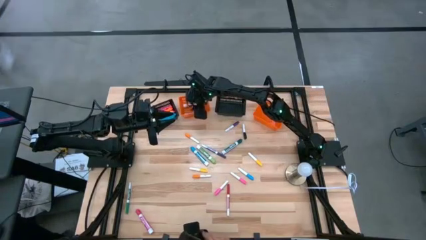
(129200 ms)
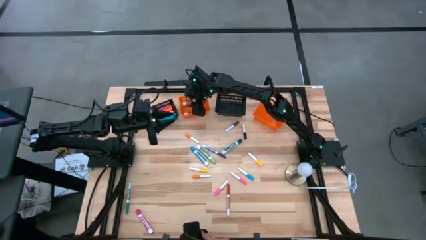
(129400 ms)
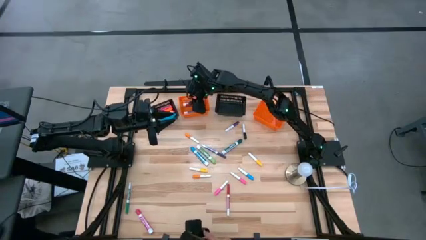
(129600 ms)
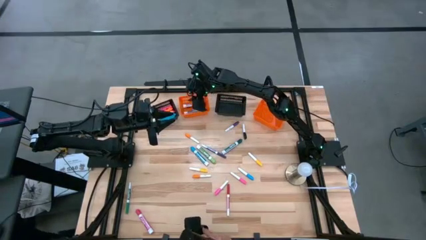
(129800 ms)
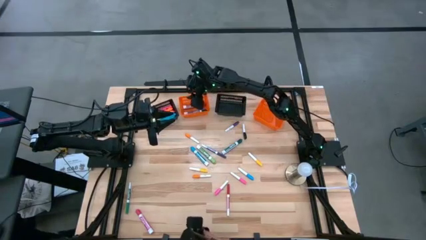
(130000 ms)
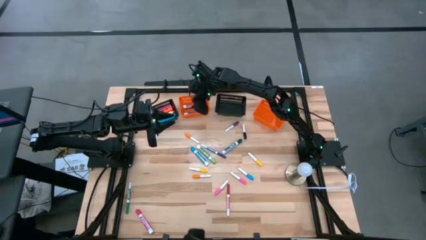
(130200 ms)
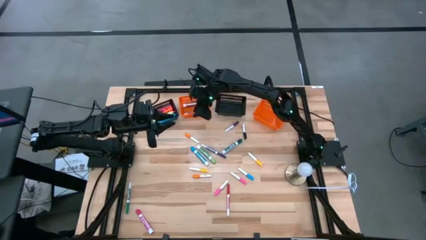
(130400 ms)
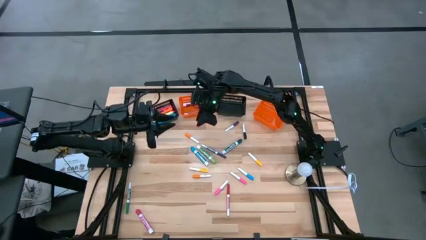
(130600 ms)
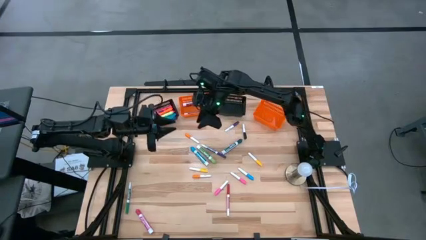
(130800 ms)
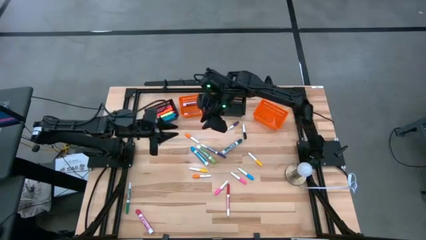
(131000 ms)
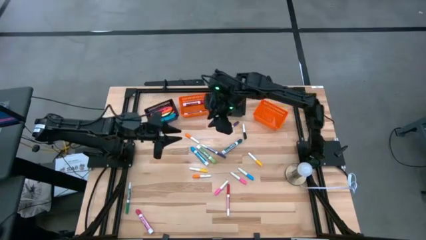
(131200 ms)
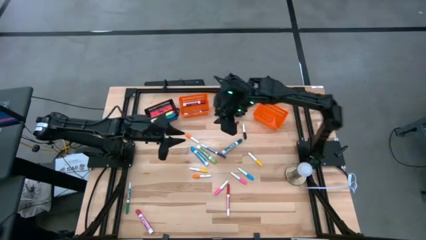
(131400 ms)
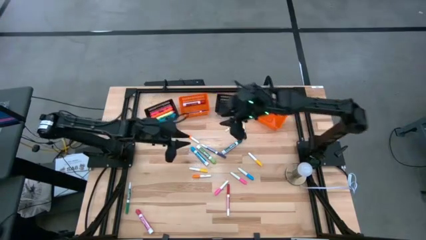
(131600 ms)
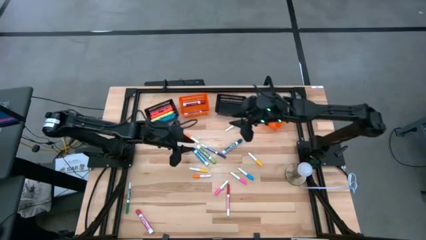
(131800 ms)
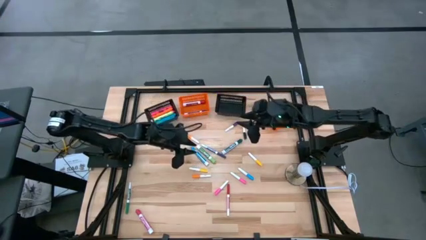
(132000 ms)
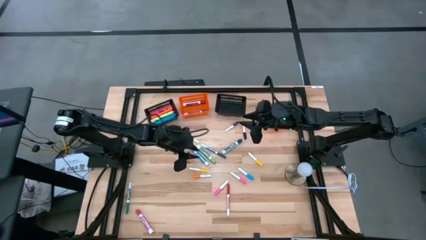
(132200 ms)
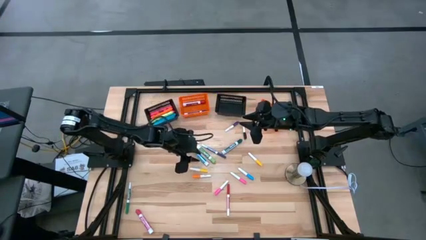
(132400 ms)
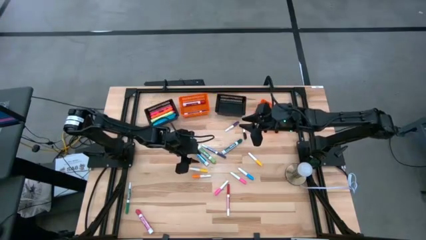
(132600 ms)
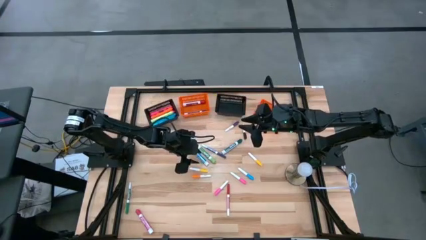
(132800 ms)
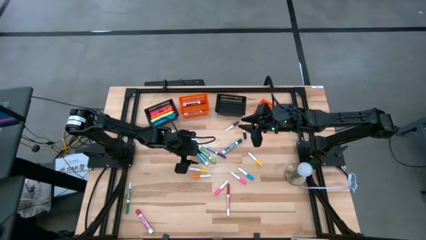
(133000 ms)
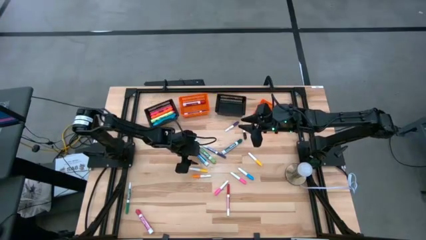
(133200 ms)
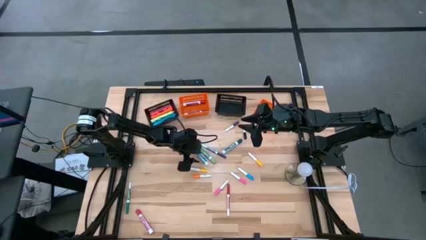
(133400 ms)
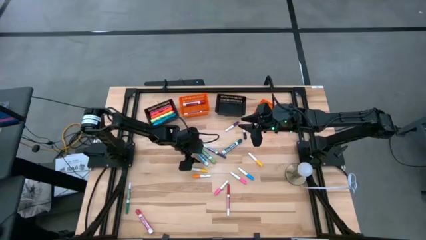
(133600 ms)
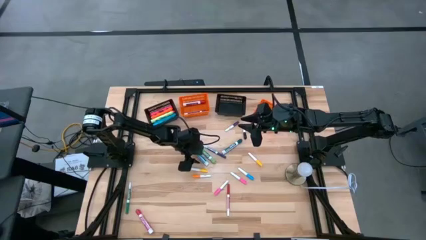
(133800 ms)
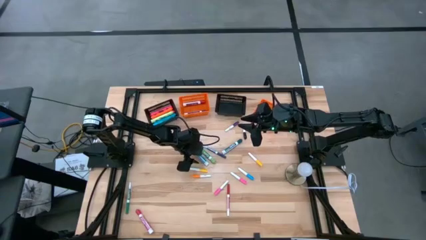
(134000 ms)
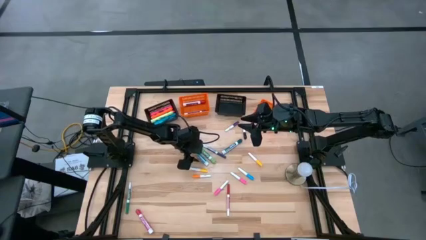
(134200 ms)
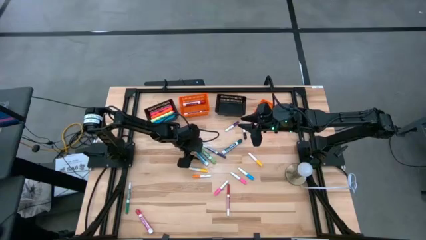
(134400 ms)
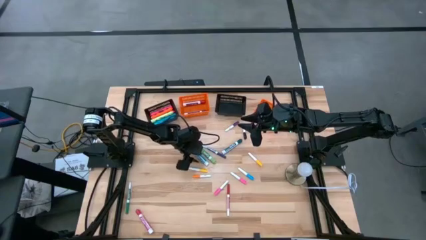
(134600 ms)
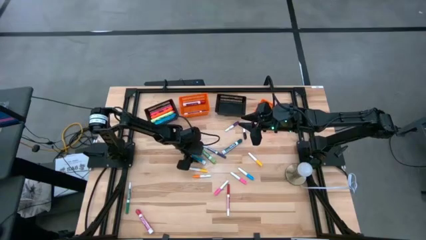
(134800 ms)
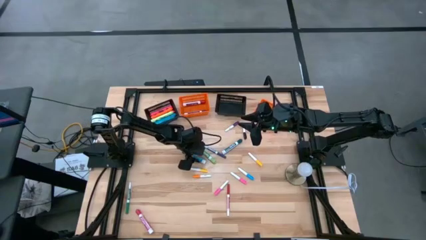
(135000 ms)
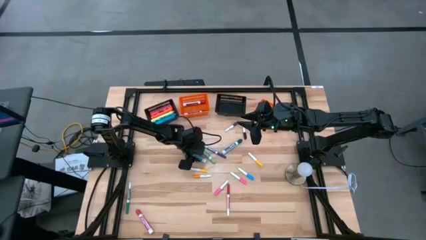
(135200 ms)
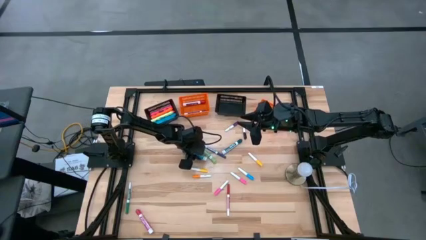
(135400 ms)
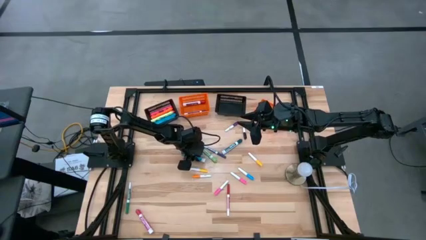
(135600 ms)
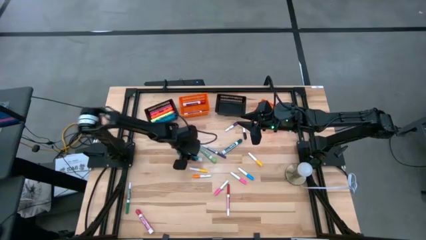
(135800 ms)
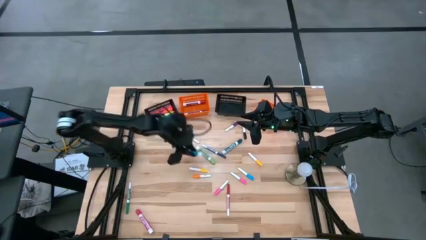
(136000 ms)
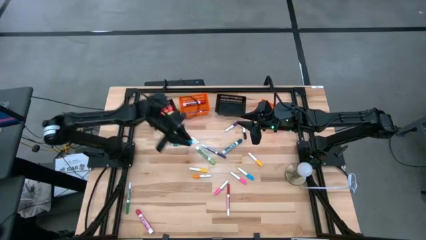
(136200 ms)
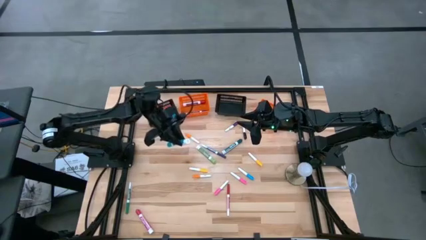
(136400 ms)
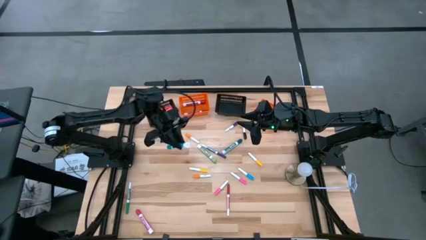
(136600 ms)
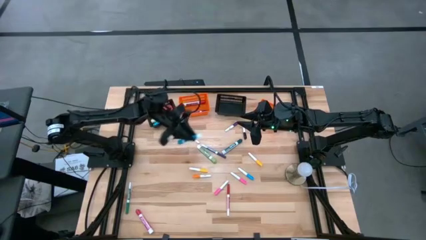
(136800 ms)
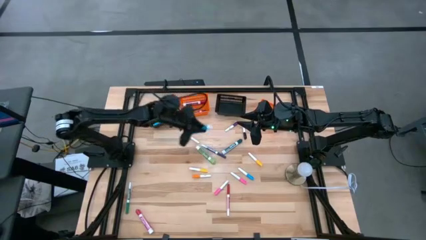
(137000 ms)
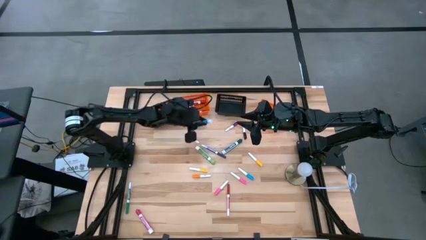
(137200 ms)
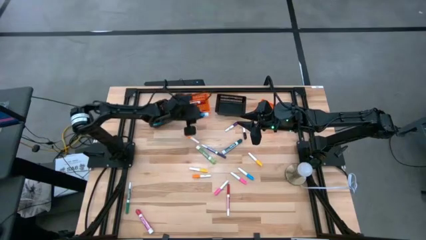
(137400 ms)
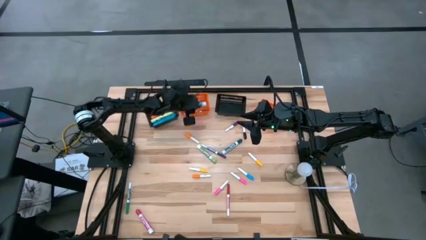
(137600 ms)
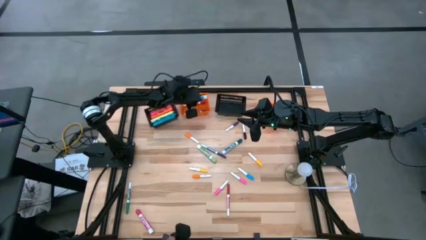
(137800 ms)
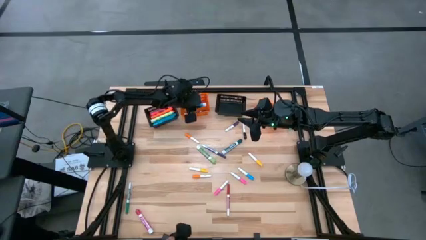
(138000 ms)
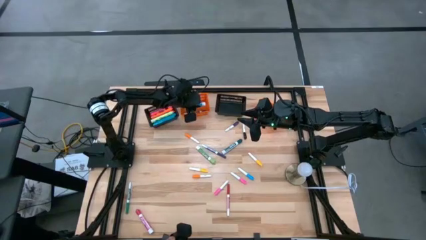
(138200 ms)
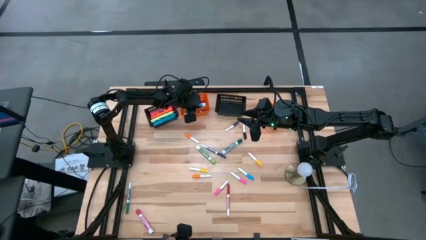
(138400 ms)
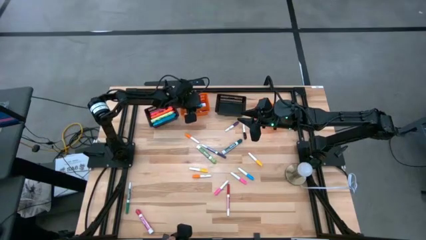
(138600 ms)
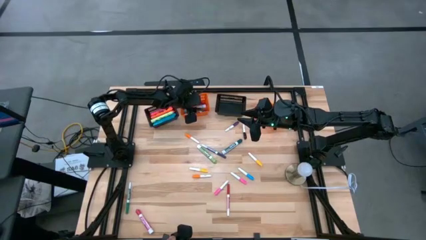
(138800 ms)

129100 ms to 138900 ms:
Task: Pick & Place Markers
Put the blue marker pen into the left orange bin

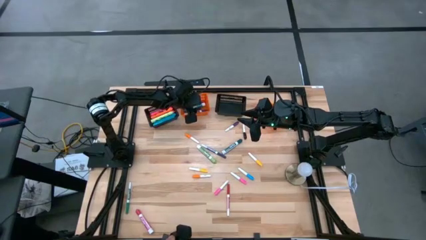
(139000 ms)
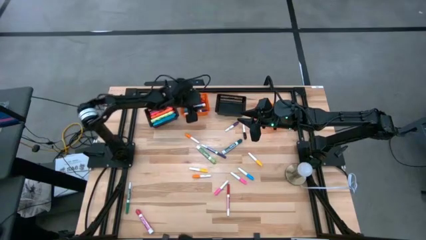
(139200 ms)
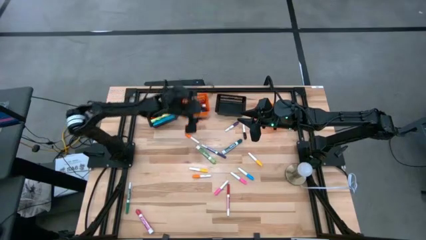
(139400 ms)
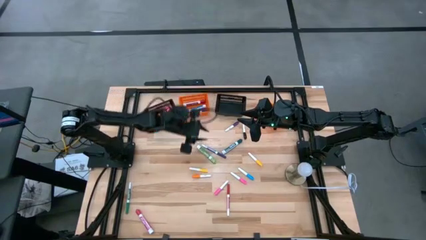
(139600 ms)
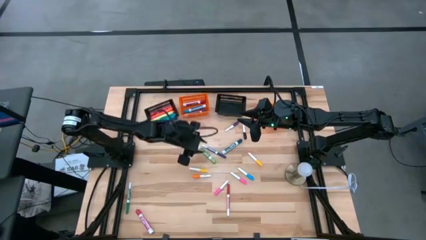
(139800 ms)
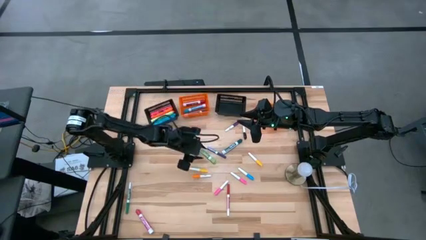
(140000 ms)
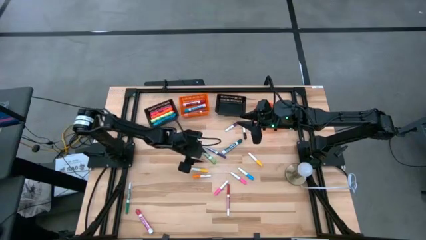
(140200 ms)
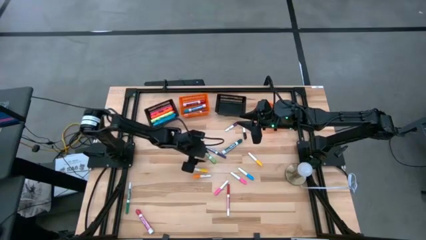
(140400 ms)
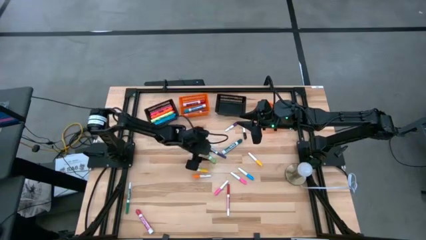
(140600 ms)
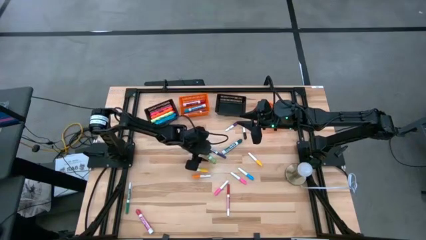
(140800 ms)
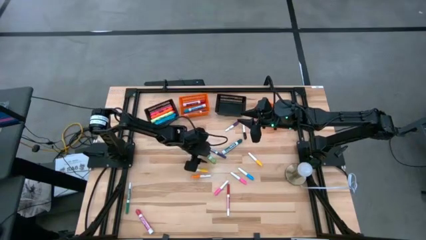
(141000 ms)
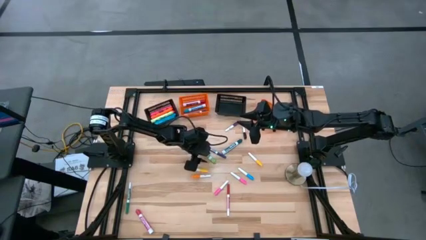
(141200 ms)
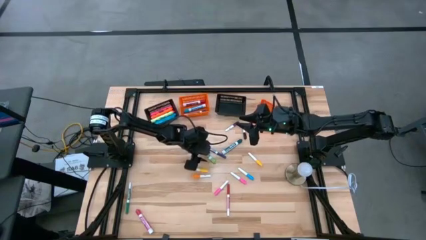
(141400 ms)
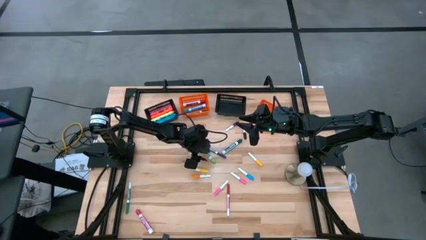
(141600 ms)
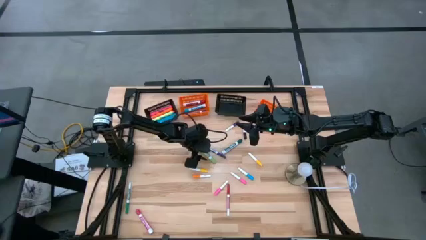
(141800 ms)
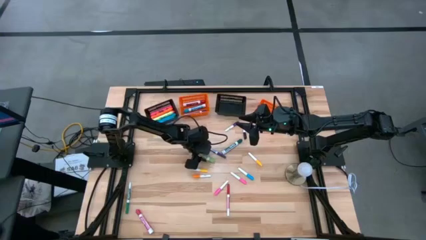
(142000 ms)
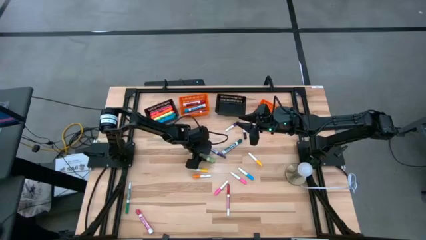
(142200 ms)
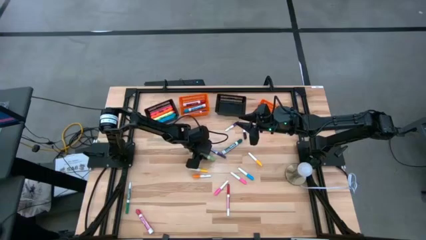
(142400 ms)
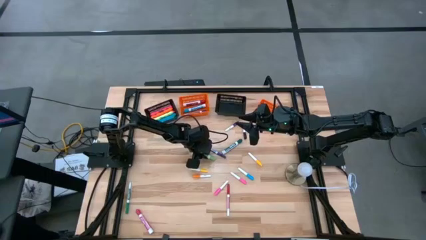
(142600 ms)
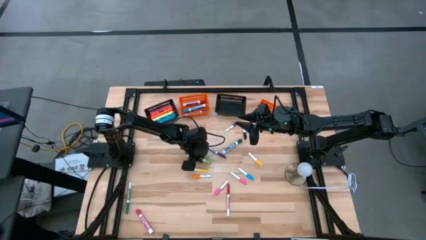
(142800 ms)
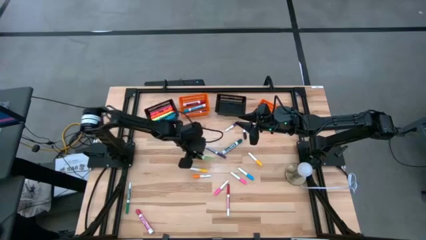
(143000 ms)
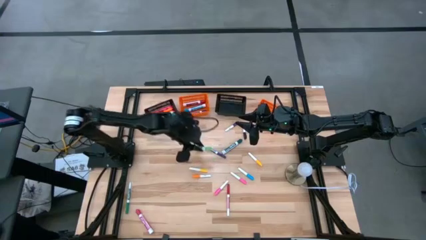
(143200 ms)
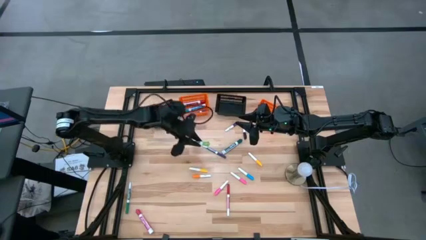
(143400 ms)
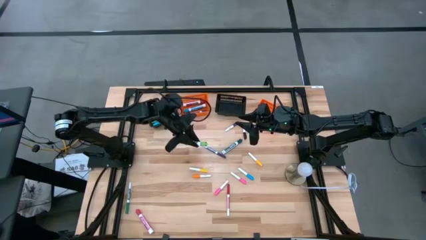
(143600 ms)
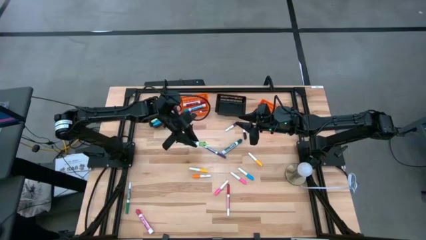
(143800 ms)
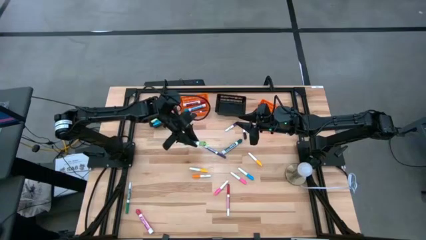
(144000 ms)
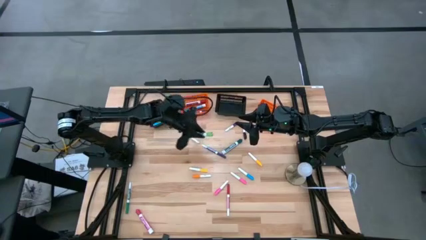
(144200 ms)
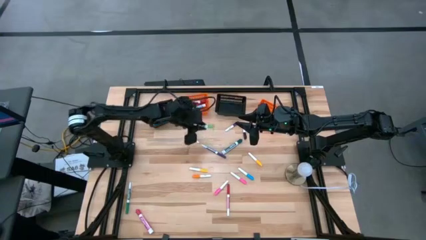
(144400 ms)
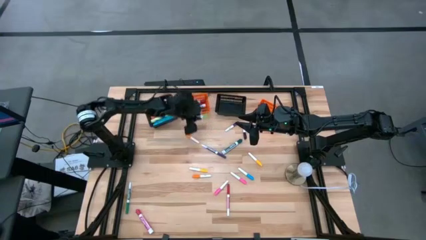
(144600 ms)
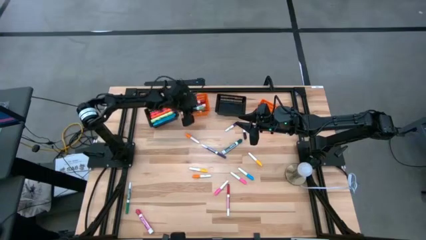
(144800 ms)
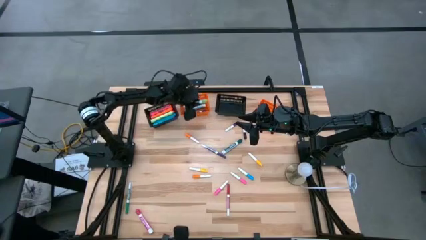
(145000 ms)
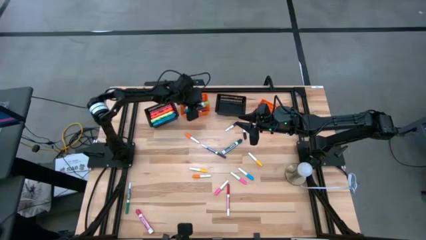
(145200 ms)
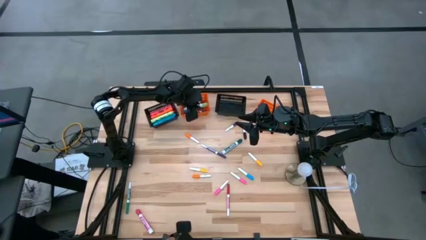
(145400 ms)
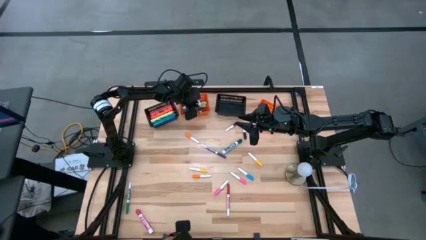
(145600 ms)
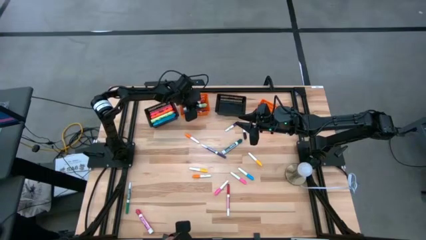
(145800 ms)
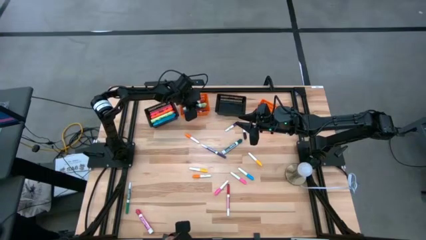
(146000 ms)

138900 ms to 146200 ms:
Put the light green marker pen into the left orange bin
